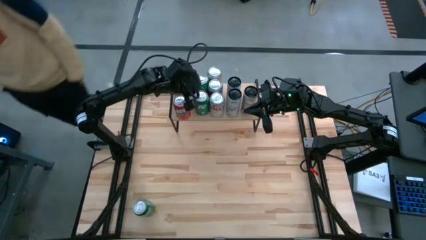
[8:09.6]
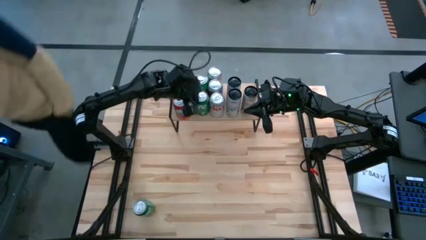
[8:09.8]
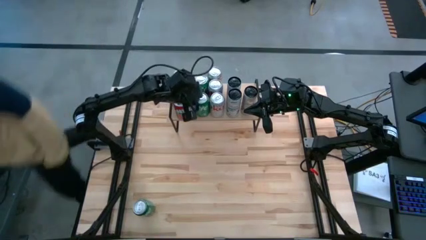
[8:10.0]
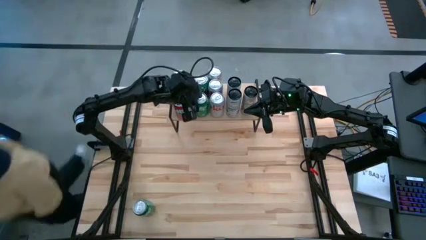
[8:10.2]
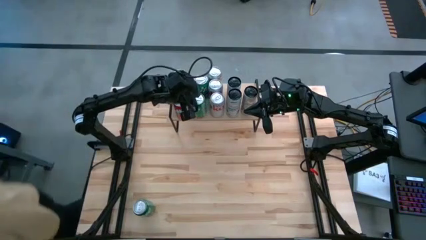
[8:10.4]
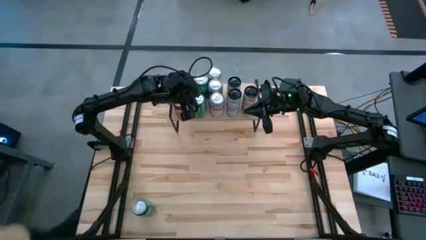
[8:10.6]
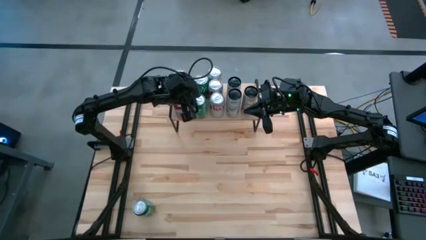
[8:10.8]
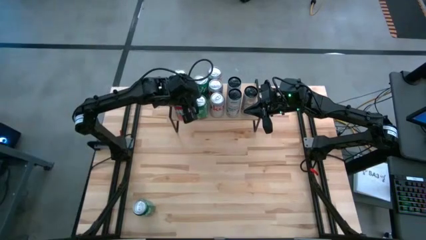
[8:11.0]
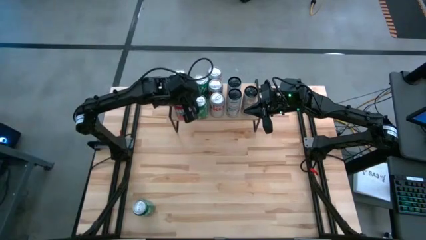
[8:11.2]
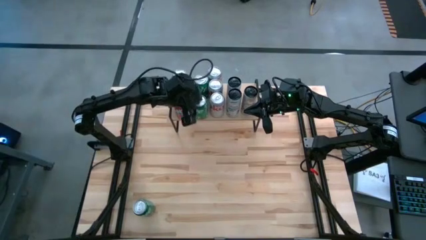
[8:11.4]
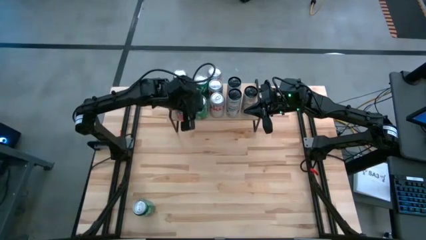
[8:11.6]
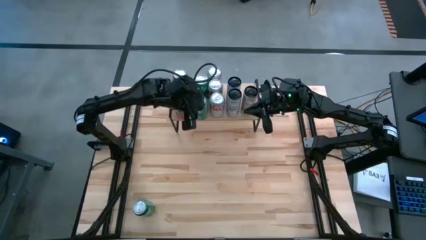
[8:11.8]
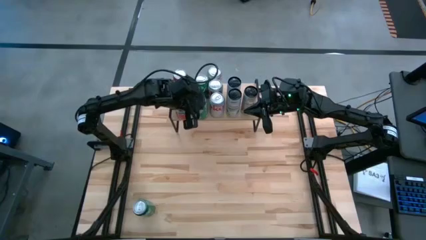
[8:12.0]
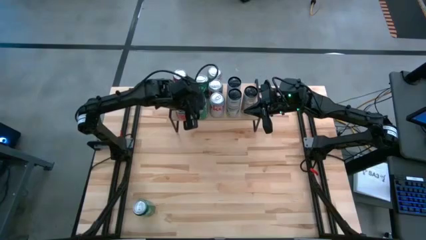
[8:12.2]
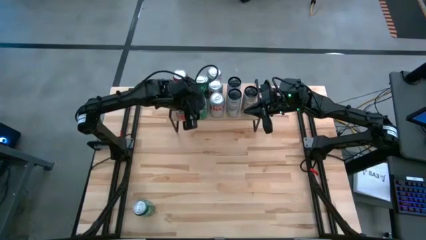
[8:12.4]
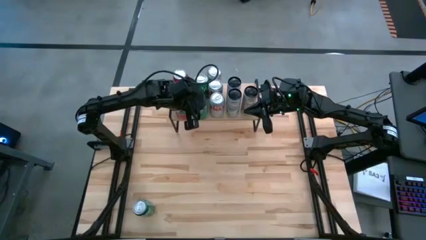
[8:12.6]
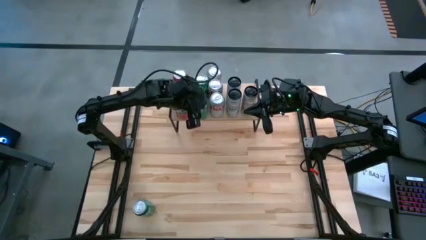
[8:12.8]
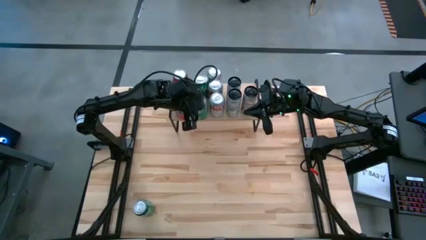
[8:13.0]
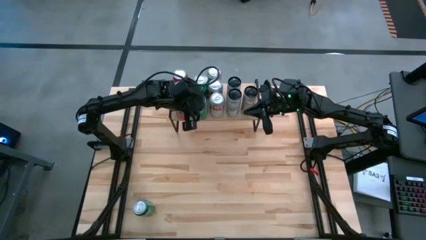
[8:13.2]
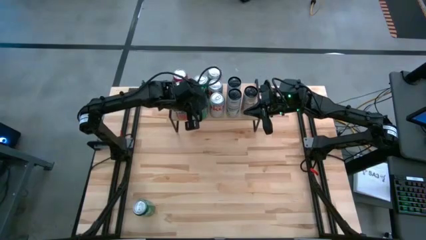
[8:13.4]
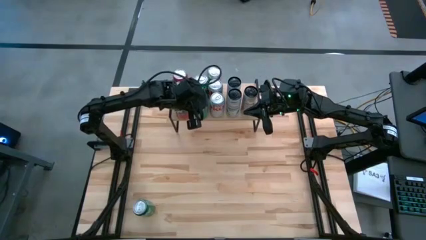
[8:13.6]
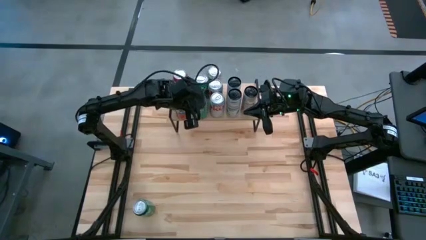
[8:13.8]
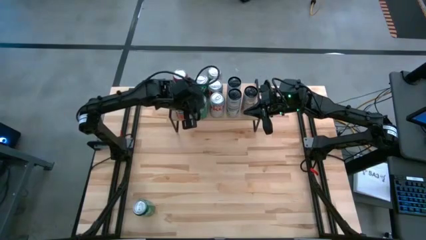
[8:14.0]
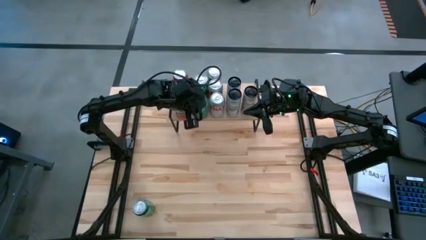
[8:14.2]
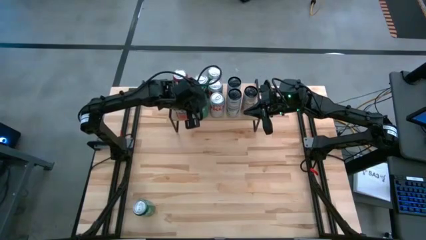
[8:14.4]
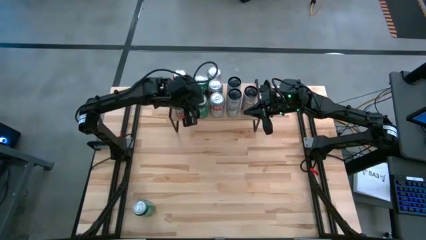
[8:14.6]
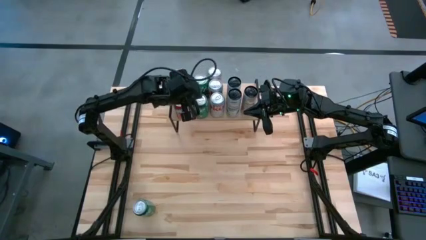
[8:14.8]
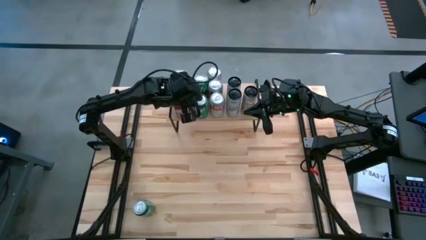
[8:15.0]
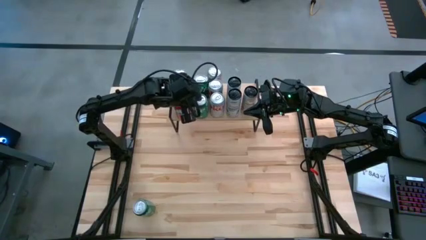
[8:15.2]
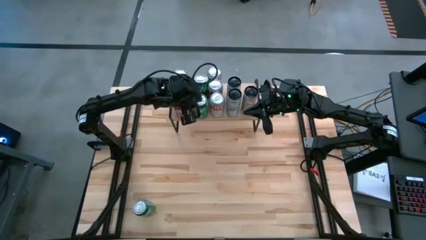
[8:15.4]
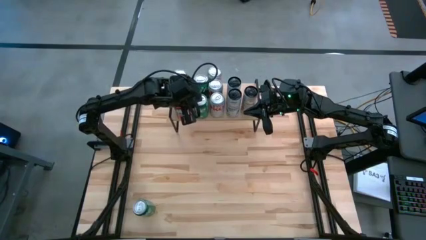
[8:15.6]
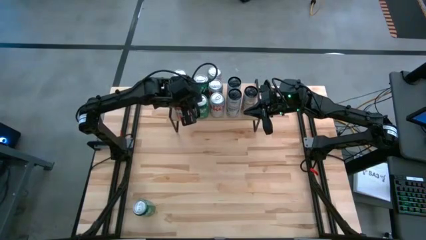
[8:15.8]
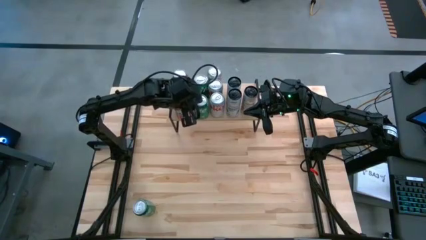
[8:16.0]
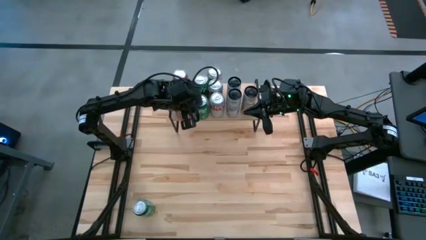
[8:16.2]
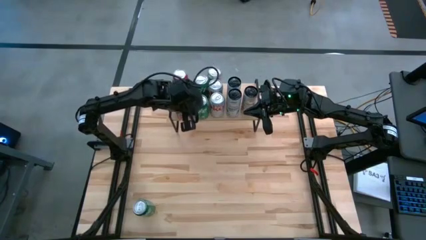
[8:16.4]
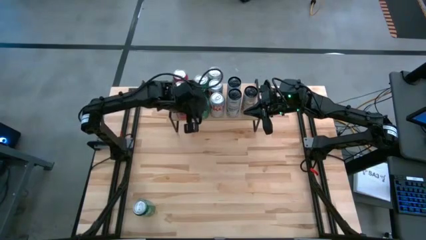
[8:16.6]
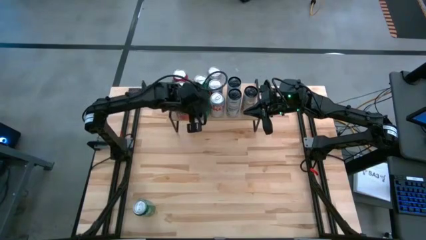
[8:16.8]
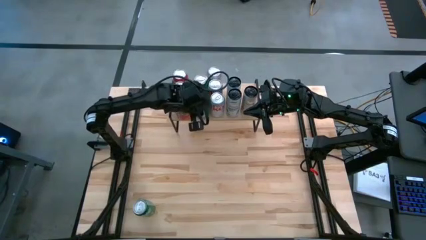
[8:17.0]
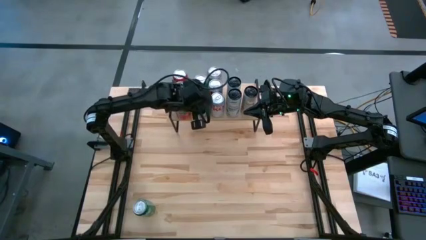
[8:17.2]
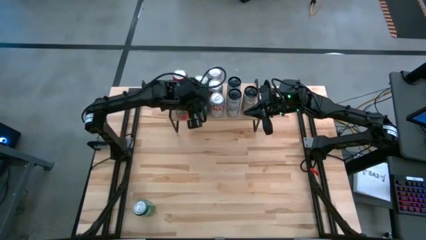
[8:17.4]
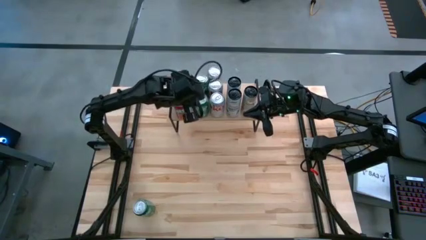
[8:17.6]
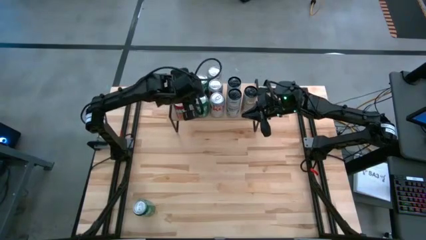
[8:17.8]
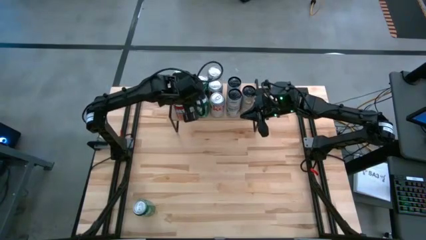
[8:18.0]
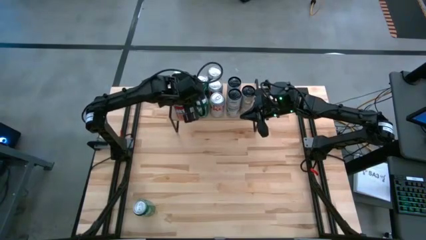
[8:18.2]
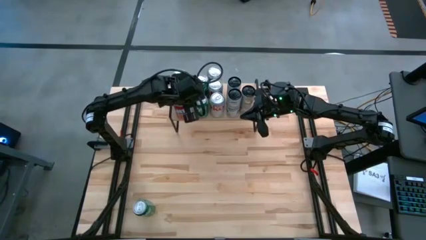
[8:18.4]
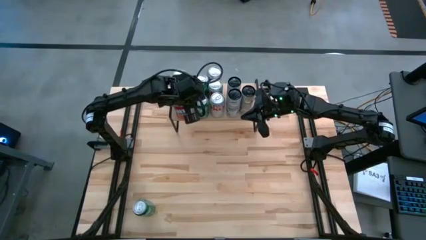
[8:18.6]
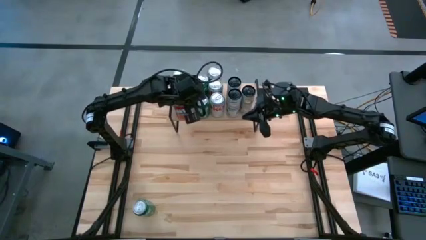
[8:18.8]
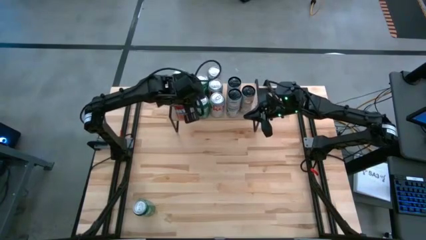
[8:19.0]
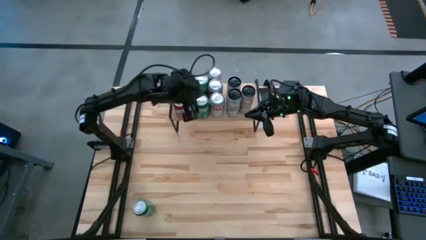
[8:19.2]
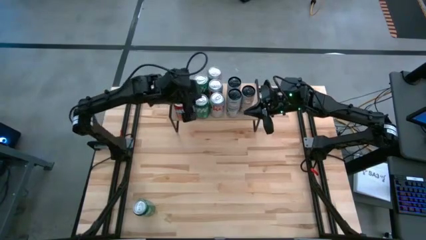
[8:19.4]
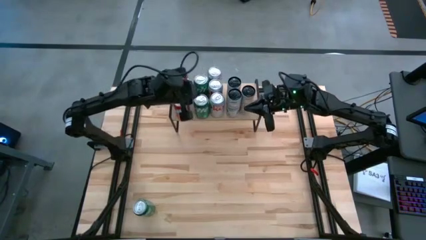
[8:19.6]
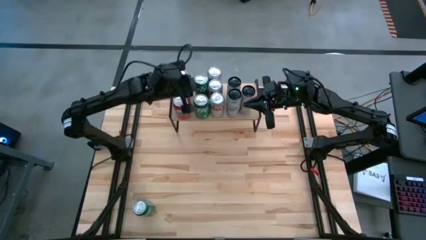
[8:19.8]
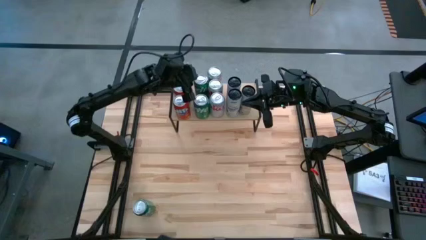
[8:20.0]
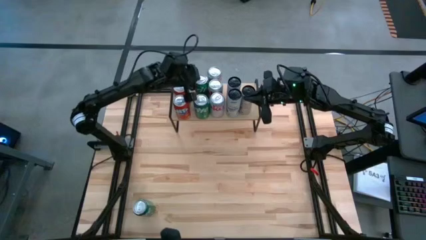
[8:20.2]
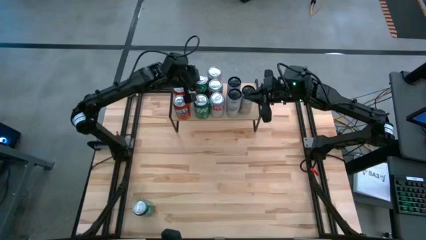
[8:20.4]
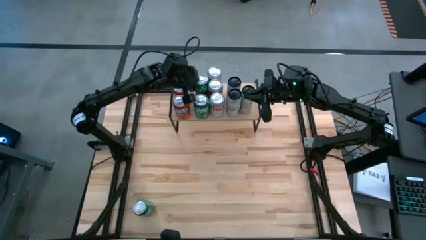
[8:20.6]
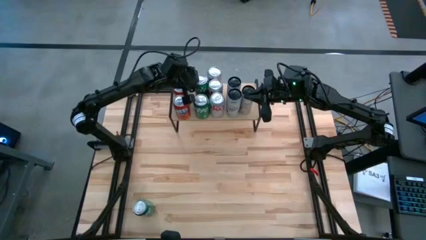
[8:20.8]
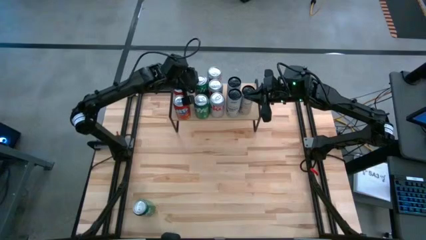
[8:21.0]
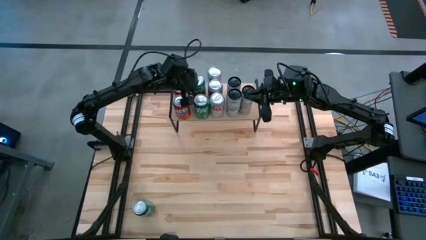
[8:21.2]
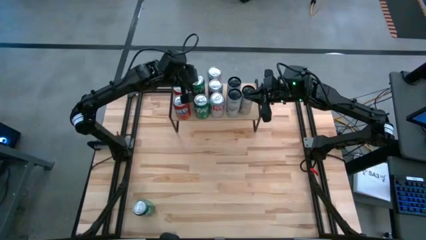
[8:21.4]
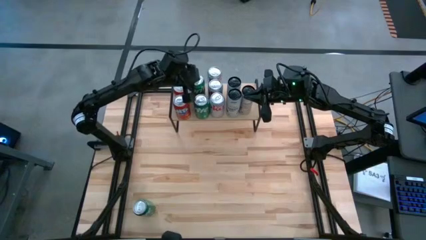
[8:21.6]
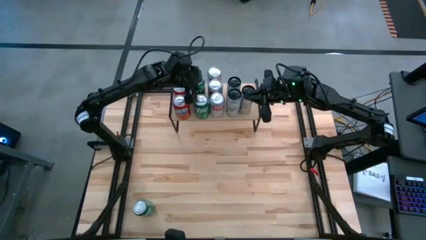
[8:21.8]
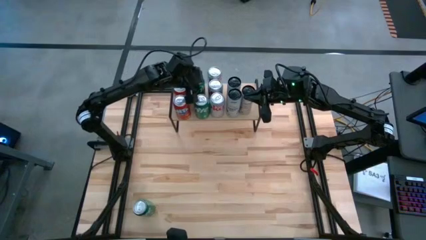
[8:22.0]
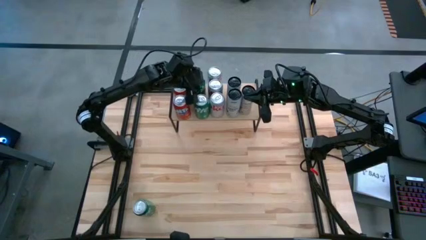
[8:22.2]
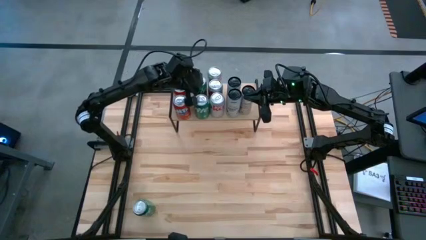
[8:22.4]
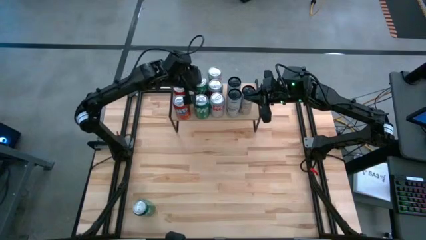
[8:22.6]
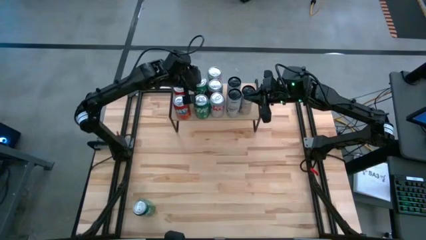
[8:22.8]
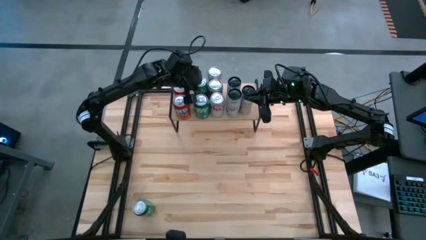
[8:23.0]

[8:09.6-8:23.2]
Task: Place canned beverage on shelf
Adjust the soda cans on the shelf

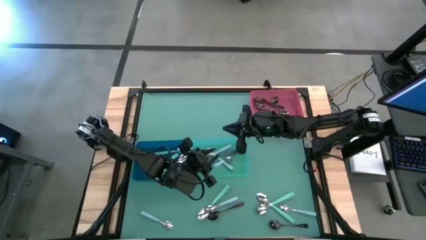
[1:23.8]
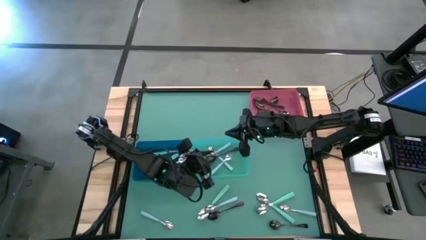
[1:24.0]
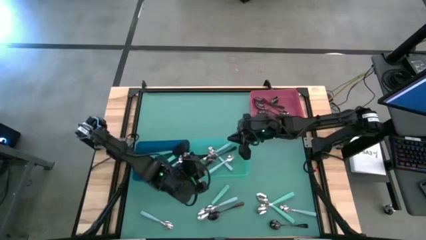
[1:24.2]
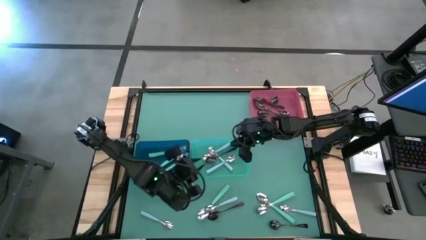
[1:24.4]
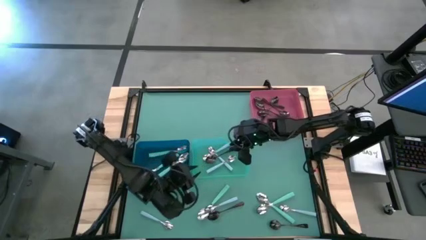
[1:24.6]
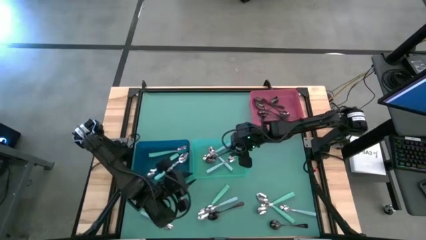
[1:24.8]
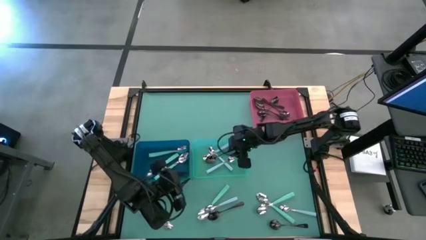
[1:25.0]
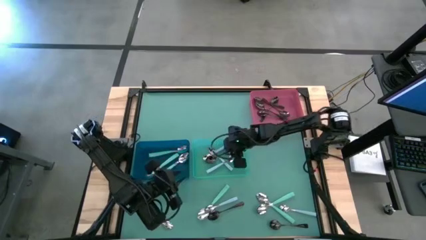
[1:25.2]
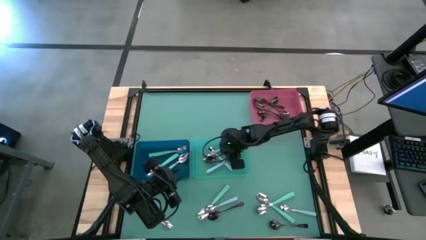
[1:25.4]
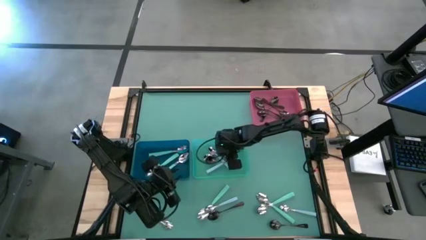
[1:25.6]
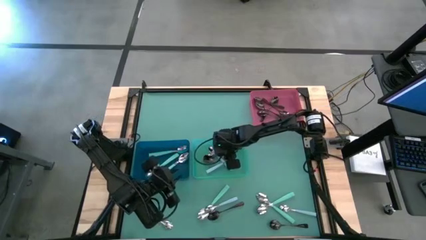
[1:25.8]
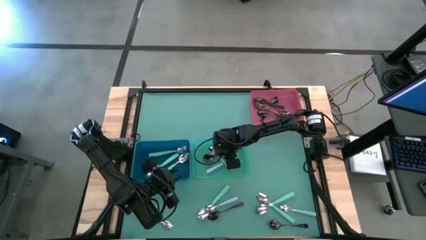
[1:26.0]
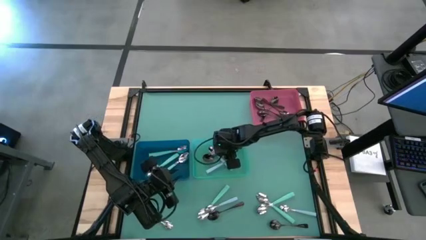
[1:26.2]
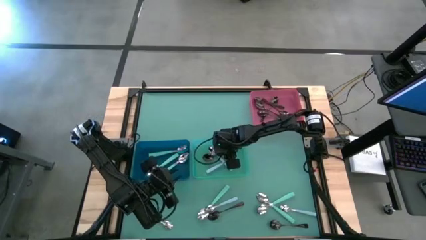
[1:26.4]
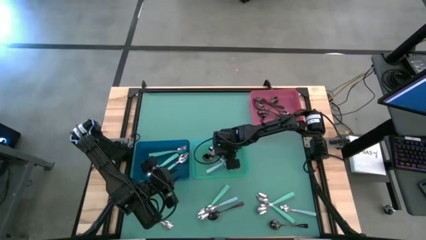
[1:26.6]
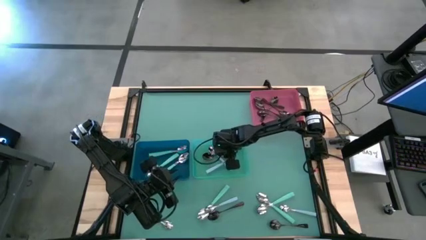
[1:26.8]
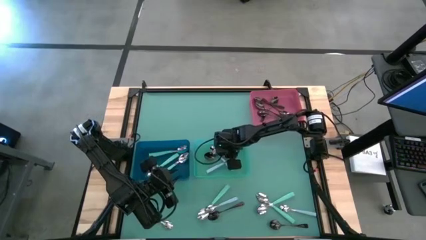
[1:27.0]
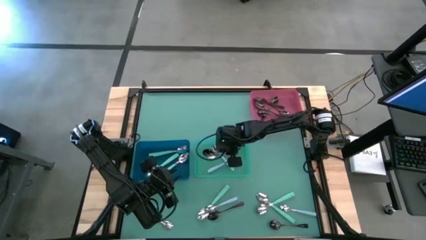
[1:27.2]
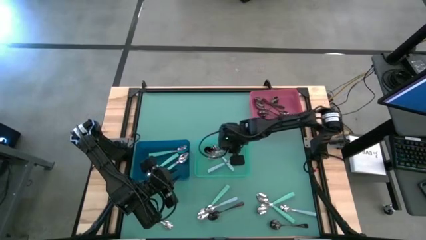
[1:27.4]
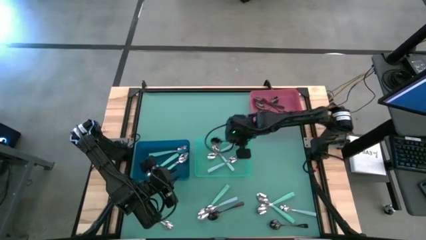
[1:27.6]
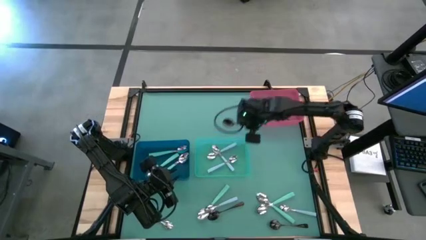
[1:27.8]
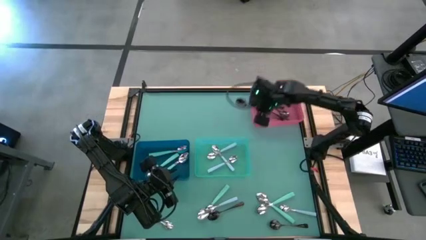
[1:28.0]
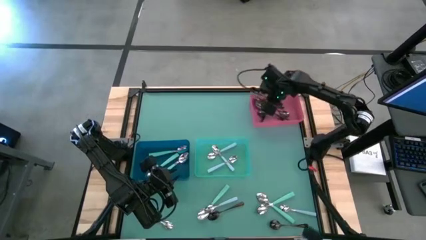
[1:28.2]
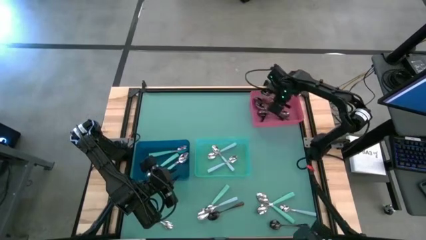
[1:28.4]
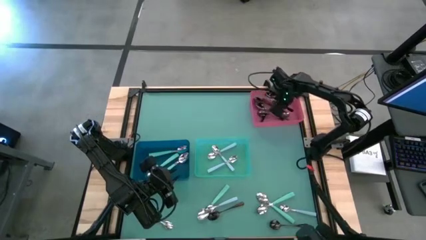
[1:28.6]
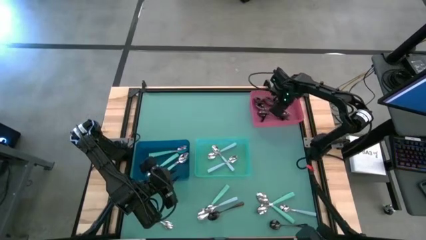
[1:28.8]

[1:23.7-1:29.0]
Task: Sort silverware by color (type)
Put the black spoon into the pink bin
